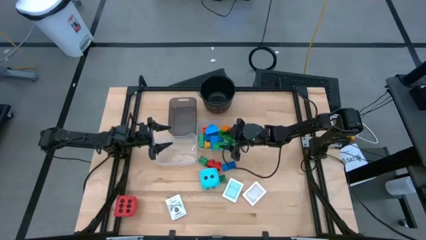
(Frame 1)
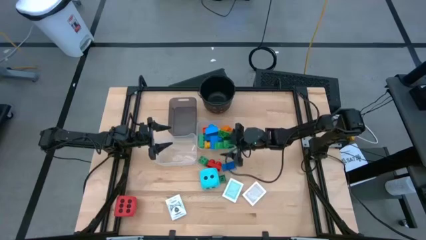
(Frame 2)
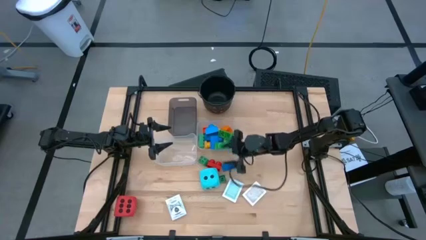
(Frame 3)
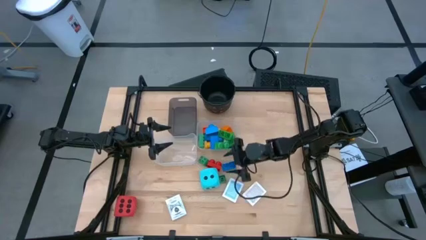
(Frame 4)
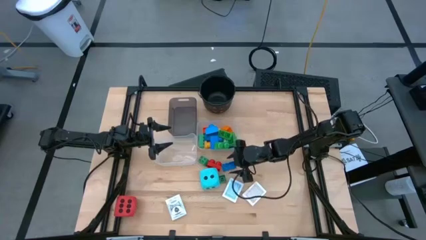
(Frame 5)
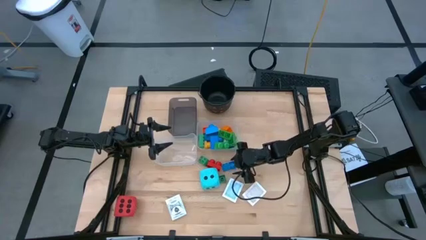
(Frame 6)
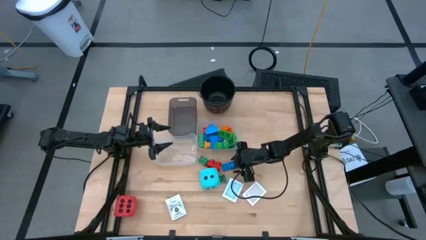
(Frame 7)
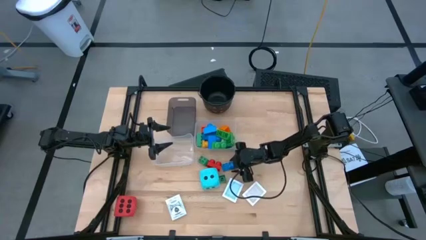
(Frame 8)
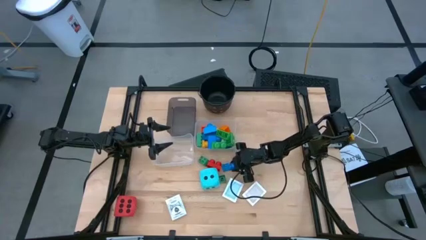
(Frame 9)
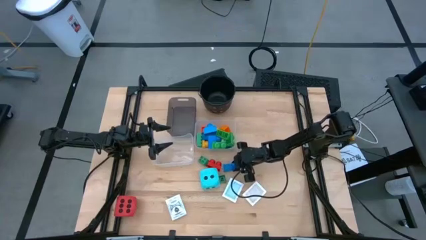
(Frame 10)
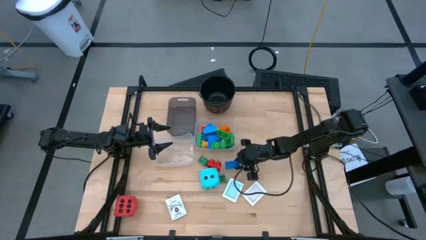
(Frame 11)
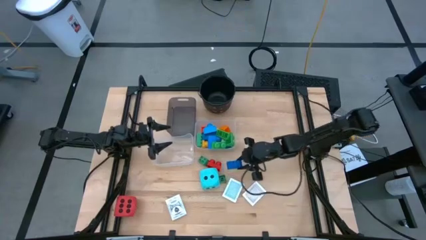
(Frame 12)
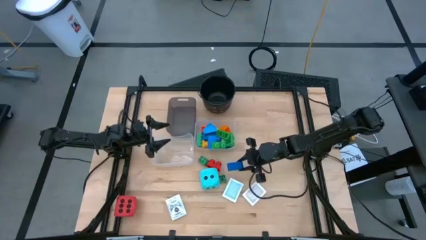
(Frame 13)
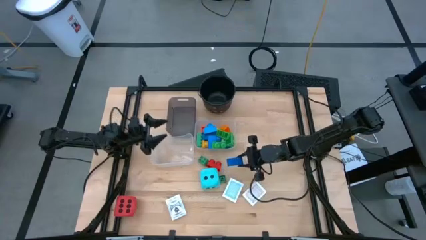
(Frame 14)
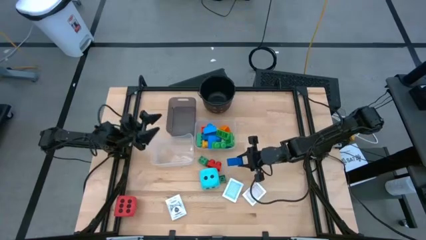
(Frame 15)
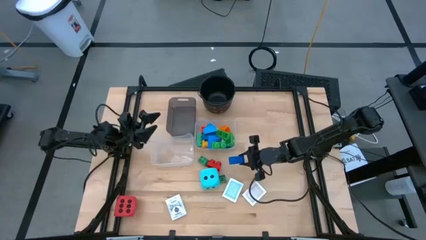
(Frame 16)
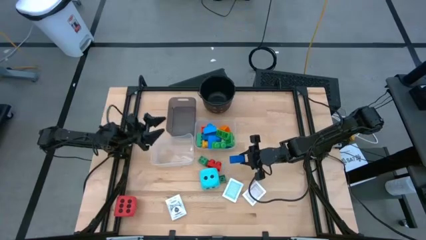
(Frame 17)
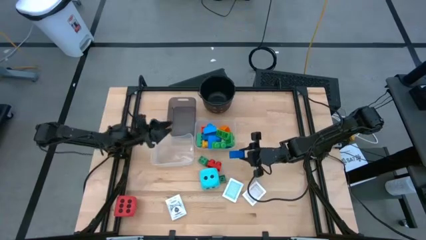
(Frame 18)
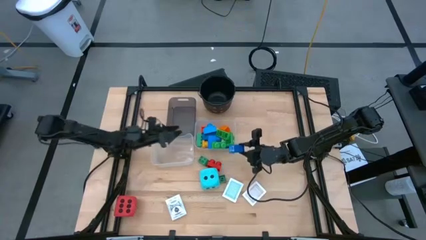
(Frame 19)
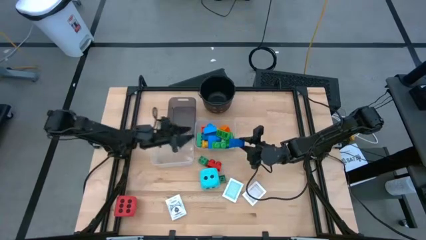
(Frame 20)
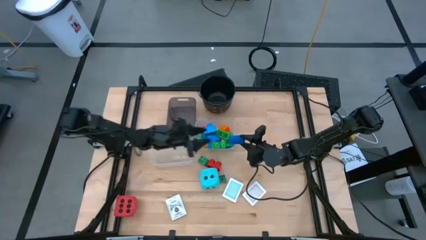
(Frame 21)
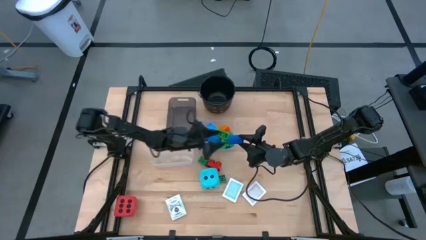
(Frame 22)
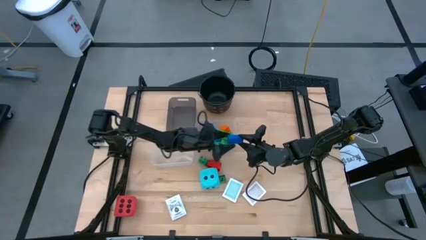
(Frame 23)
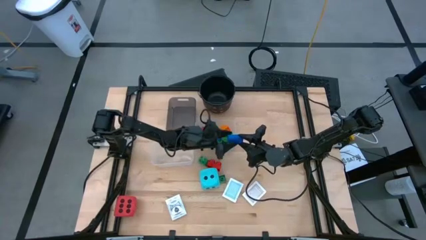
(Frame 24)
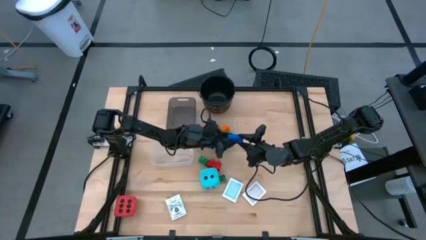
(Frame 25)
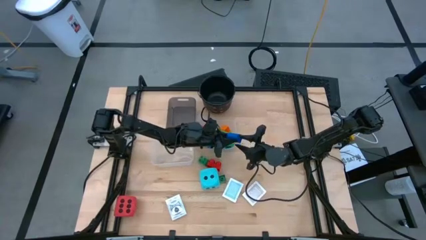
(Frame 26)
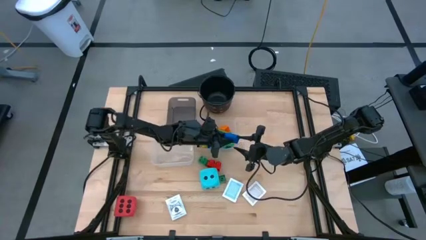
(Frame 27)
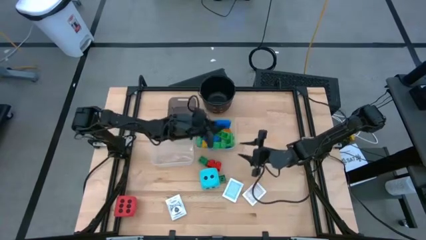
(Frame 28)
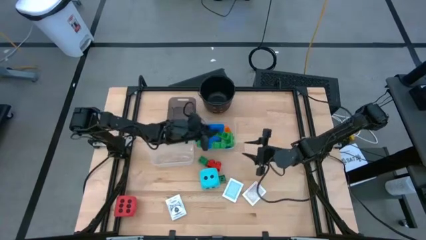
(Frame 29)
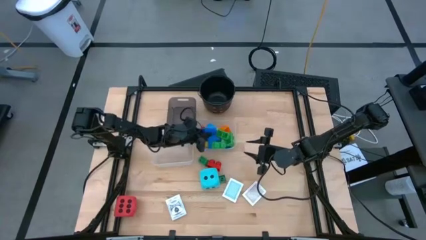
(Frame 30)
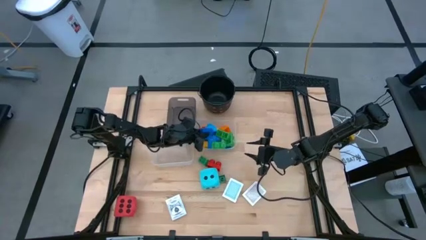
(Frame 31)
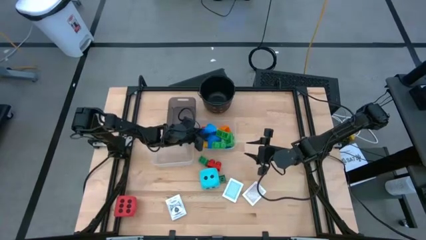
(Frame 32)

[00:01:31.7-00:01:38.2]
Task: Pick & Place Toys
Put the blue game piece into the right transparent bin

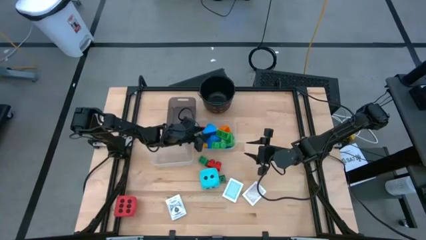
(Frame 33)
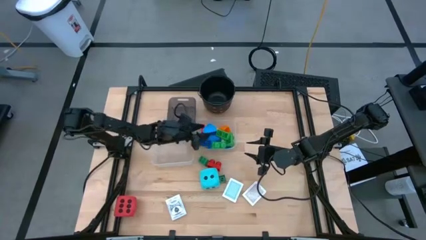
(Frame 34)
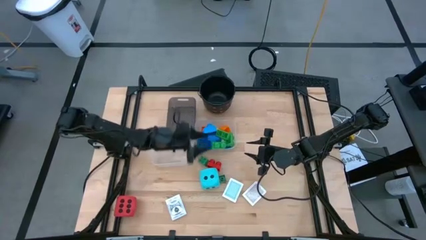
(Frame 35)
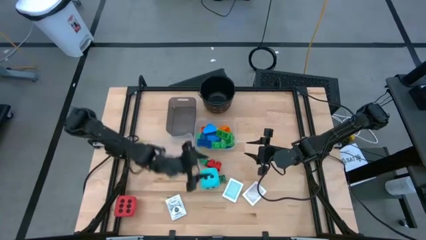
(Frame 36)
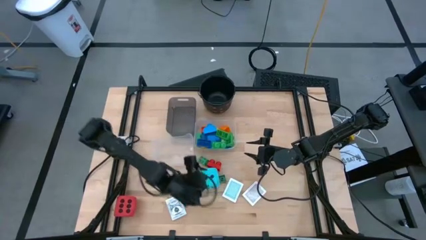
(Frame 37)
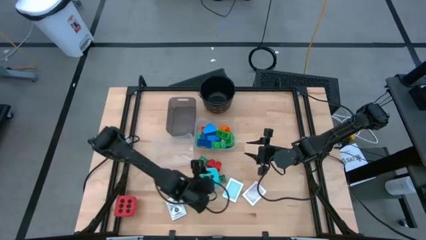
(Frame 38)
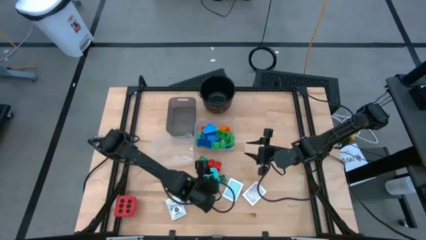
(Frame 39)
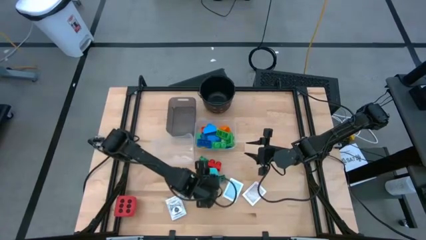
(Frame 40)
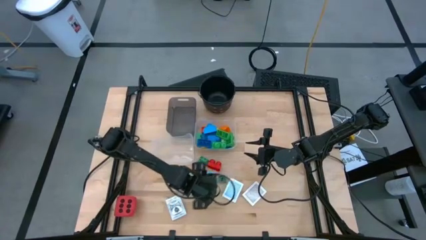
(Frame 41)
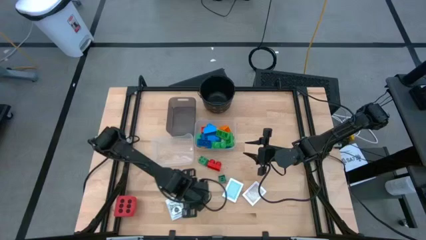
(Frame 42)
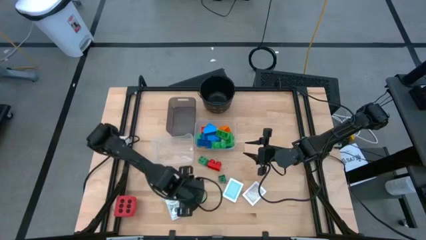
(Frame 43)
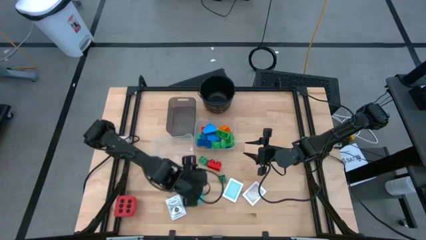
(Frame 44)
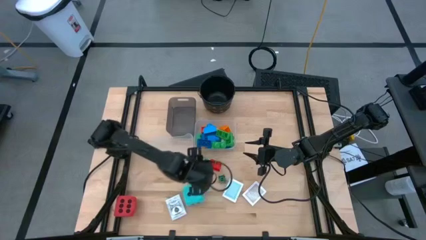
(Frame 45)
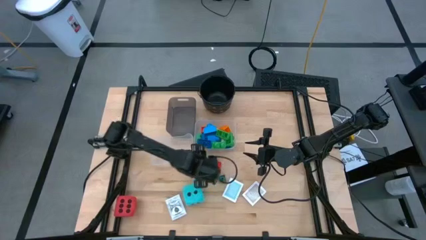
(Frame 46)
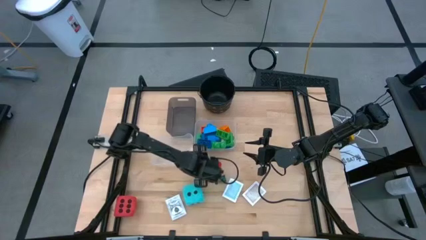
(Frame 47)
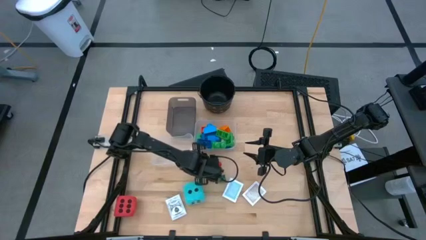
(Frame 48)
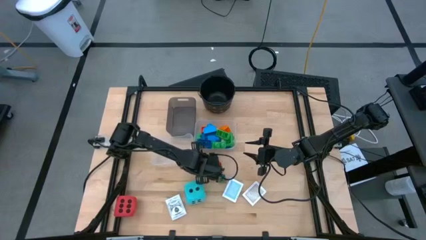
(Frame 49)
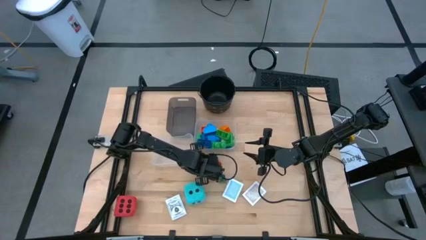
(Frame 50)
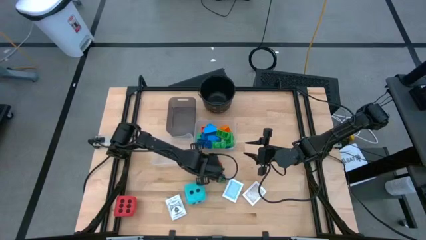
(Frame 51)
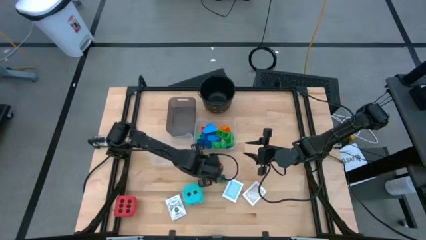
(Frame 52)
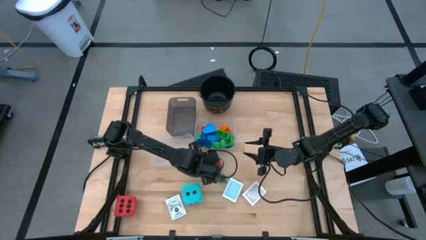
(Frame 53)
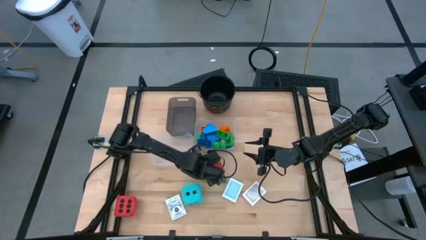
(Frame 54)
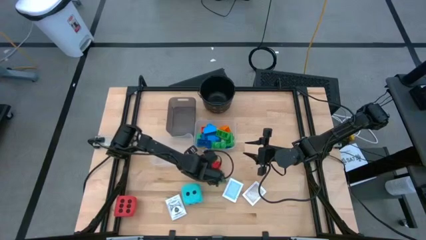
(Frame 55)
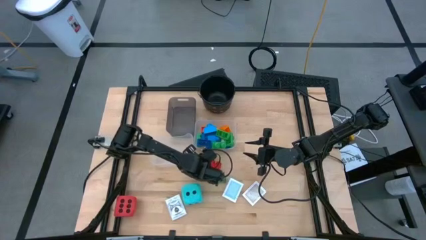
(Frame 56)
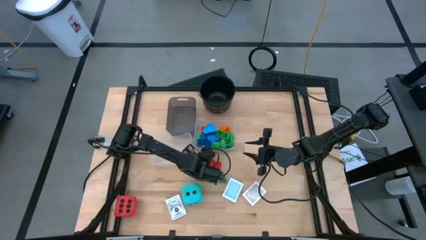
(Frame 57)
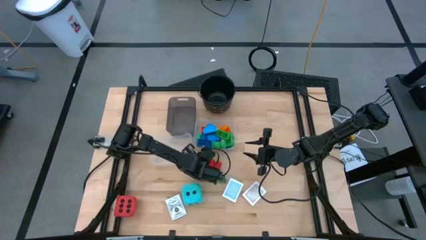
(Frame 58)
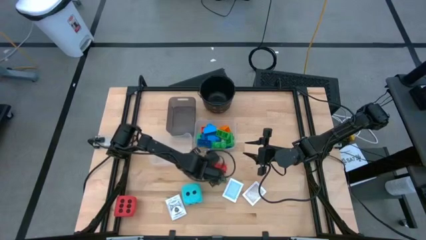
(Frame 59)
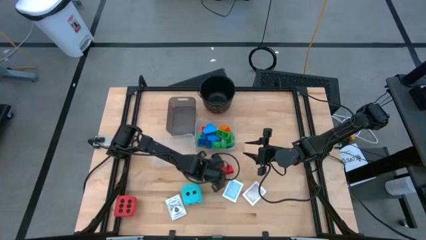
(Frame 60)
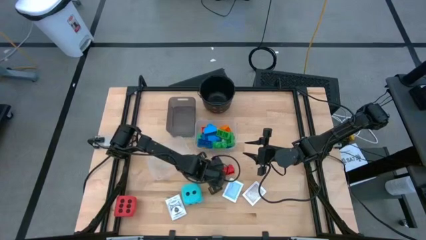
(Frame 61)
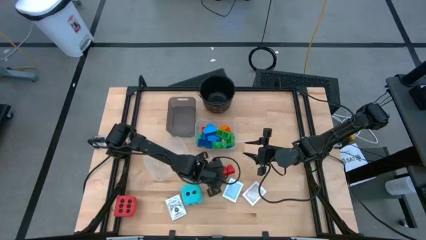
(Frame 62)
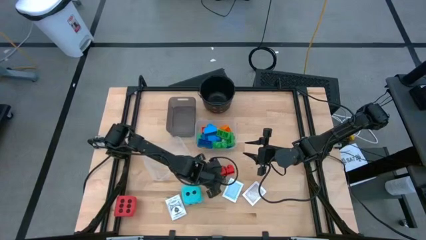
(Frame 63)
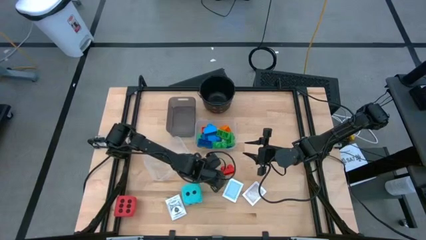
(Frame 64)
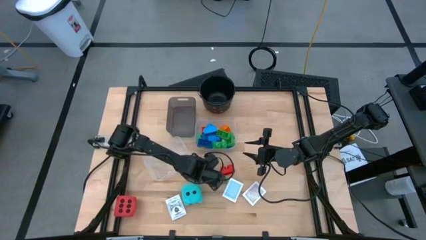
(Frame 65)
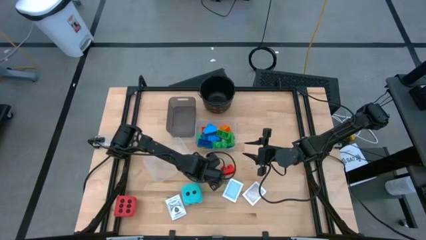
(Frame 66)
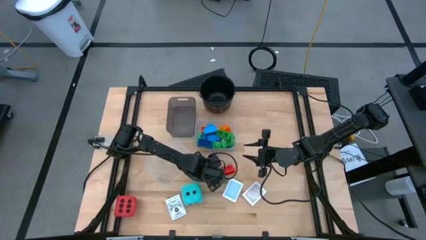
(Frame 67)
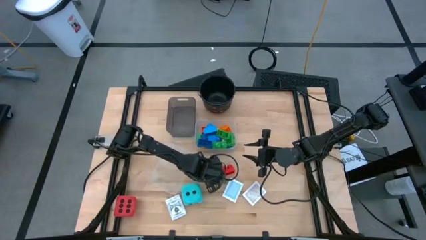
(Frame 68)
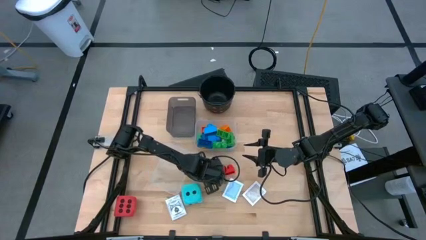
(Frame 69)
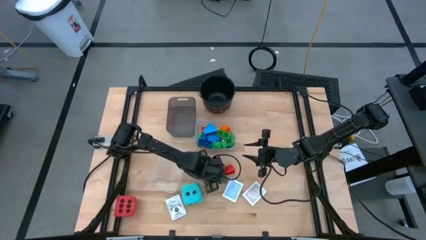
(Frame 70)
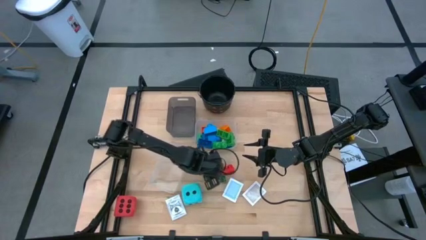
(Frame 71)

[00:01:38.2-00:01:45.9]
Put the green game piece into the right transparent bin

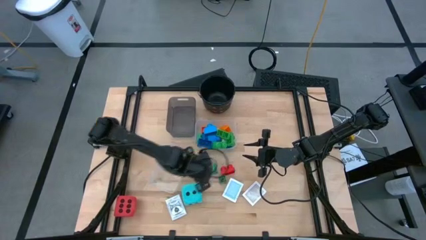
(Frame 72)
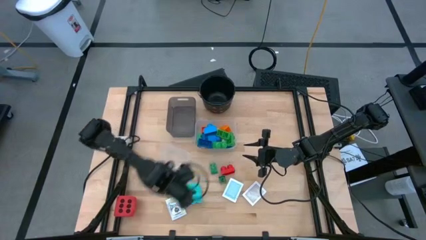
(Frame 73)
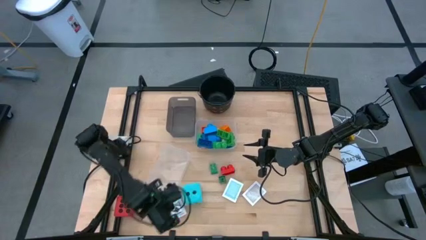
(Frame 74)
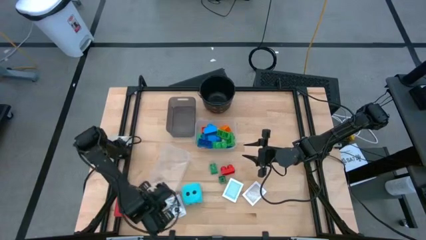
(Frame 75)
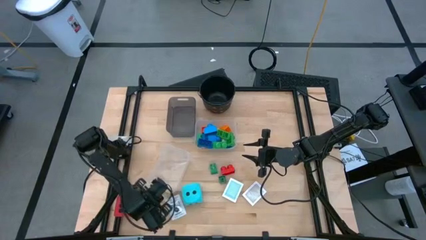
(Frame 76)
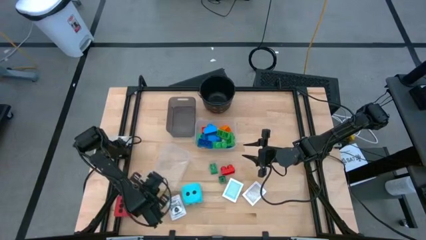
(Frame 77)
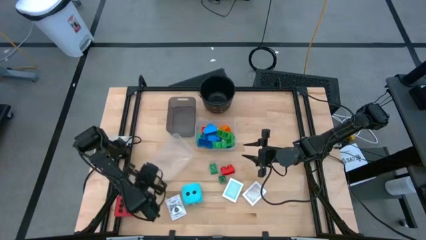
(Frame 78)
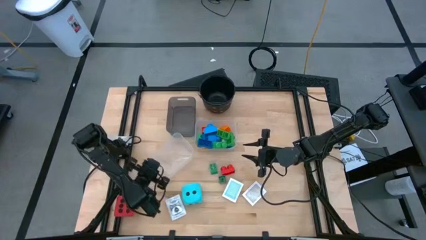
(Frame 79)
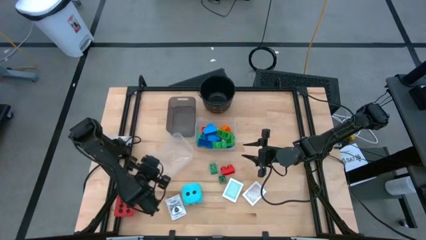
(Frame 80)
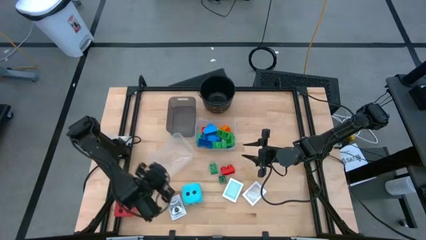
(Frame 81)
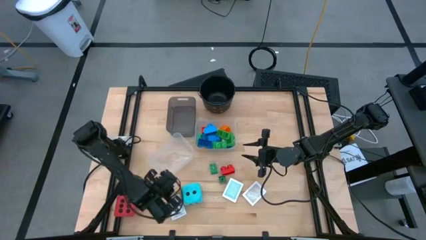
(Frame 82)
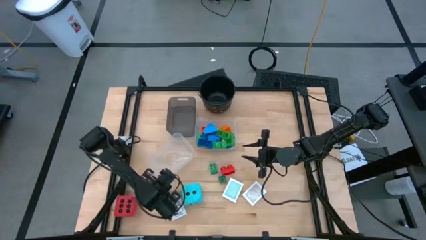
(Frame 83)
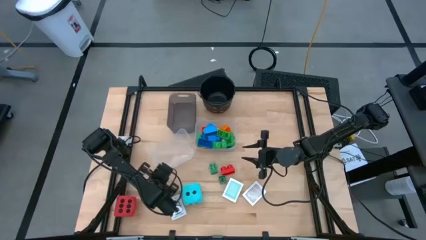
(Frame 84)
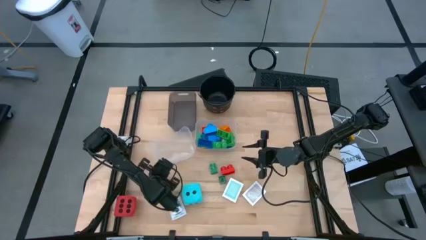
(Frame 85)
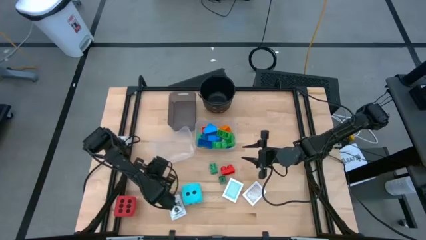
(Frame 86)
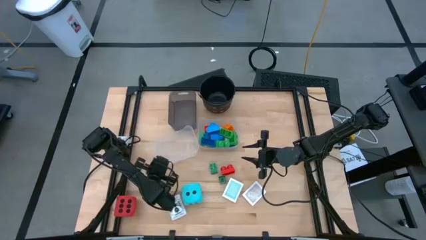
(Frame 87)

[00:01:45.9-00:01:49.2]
Adjust the left transparent bin
